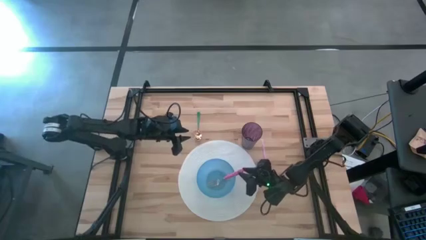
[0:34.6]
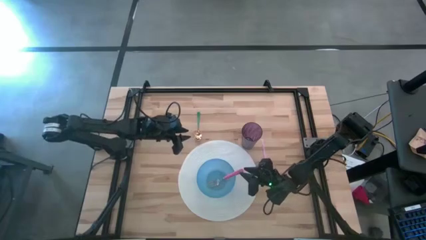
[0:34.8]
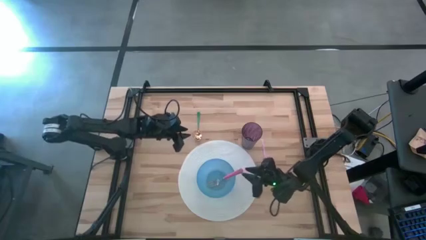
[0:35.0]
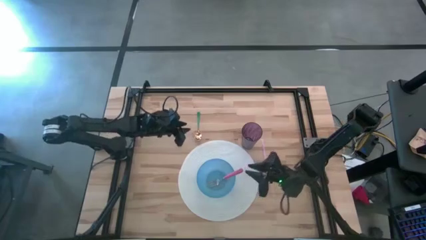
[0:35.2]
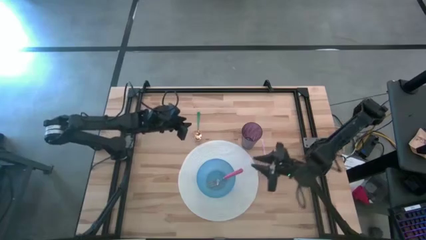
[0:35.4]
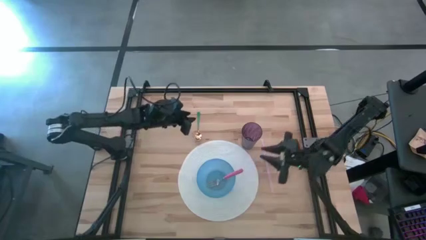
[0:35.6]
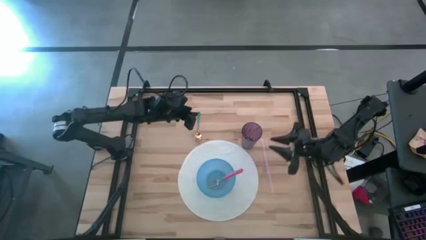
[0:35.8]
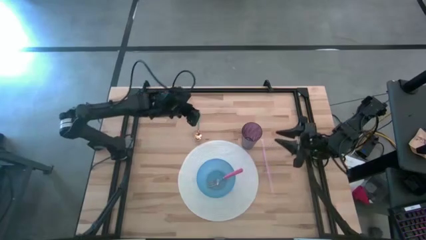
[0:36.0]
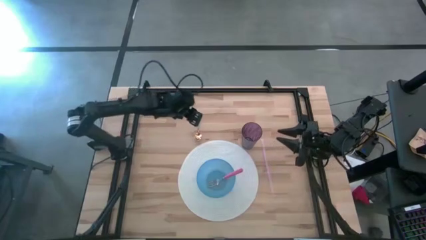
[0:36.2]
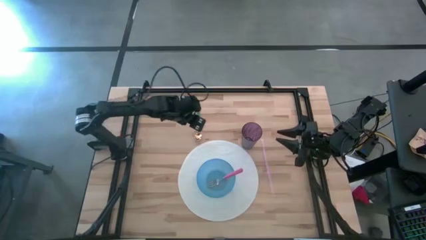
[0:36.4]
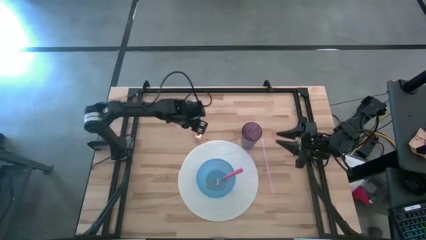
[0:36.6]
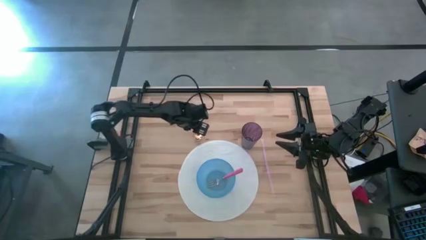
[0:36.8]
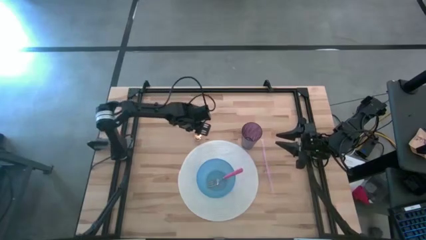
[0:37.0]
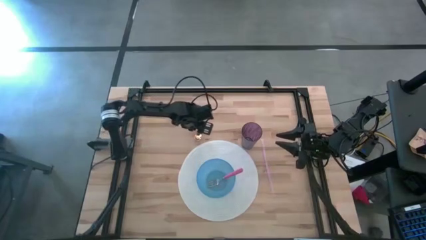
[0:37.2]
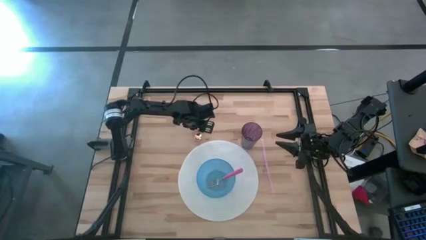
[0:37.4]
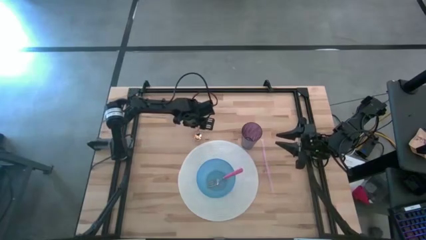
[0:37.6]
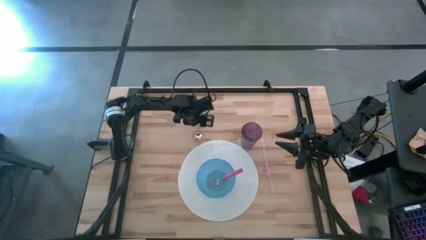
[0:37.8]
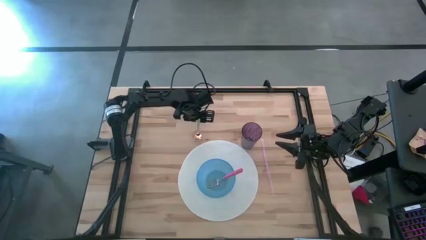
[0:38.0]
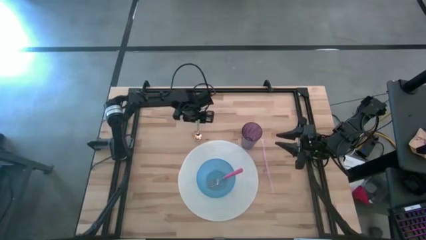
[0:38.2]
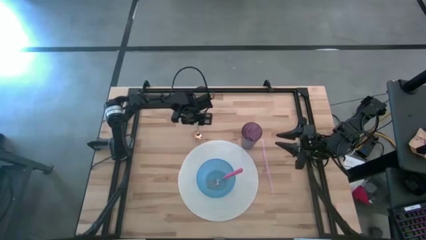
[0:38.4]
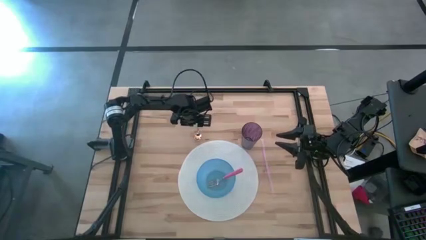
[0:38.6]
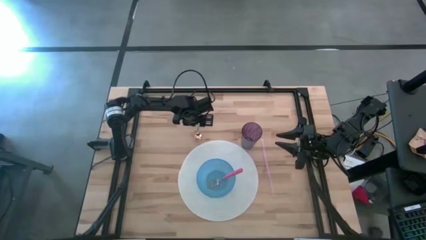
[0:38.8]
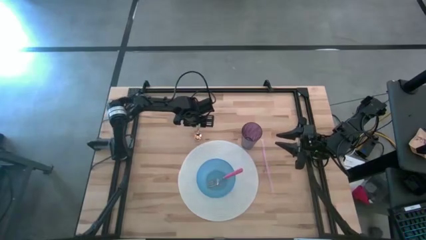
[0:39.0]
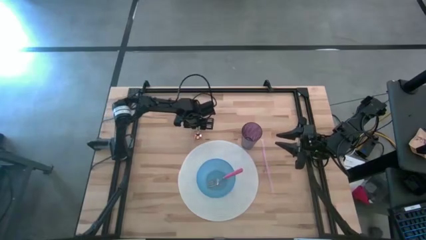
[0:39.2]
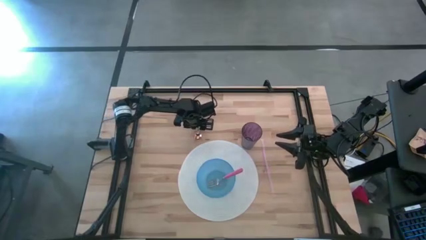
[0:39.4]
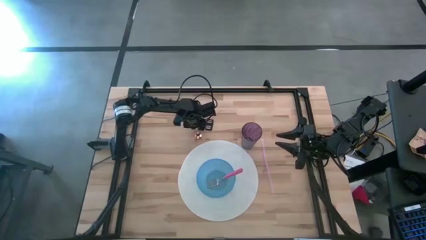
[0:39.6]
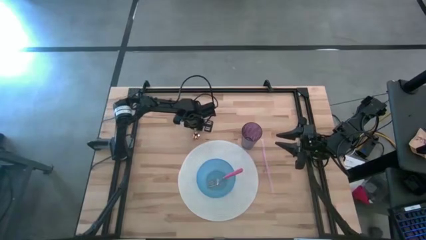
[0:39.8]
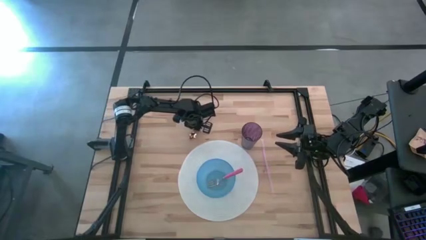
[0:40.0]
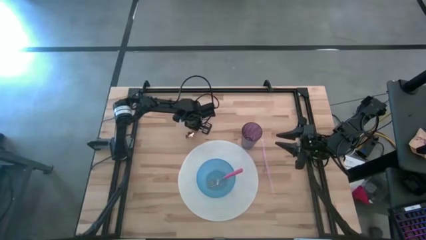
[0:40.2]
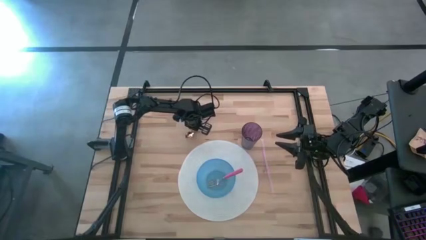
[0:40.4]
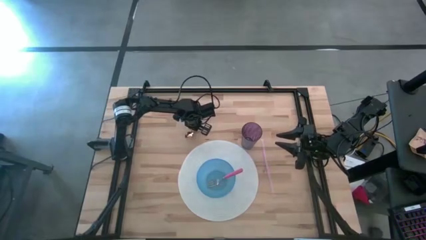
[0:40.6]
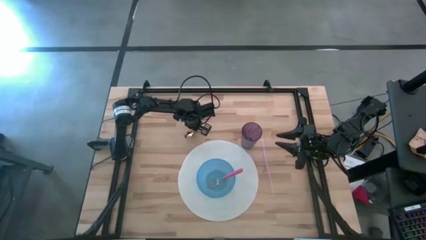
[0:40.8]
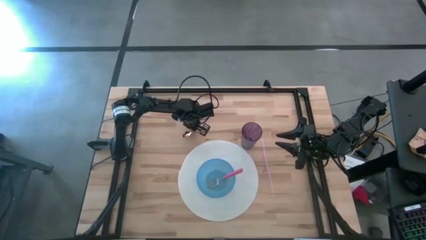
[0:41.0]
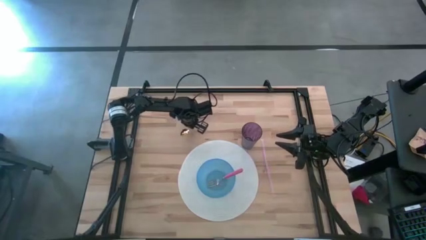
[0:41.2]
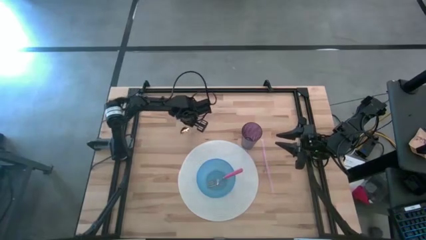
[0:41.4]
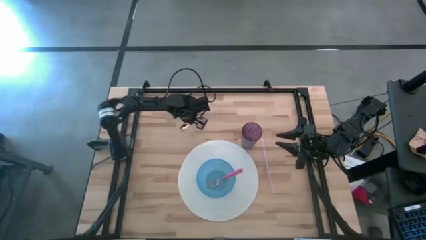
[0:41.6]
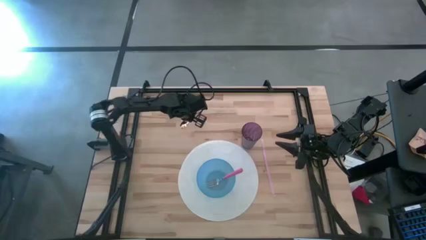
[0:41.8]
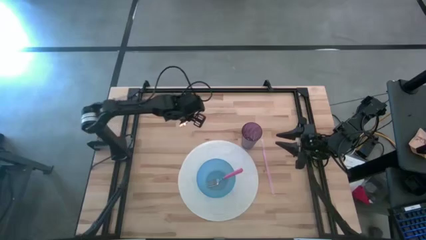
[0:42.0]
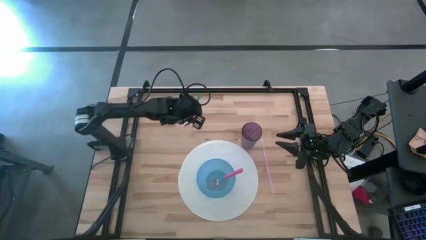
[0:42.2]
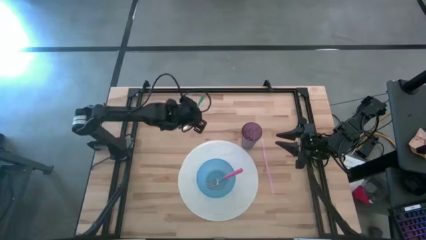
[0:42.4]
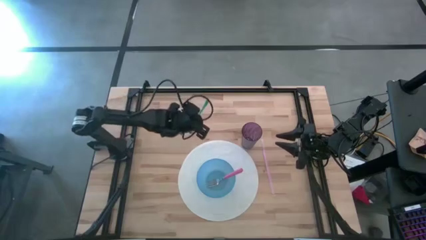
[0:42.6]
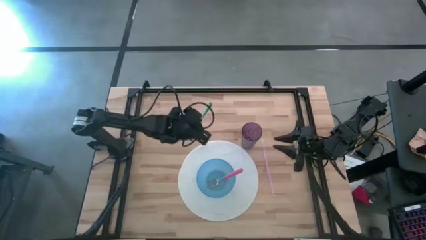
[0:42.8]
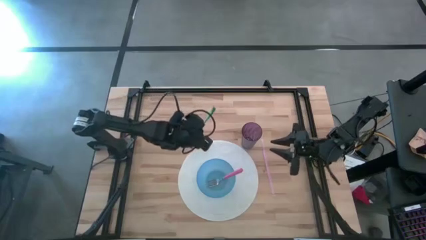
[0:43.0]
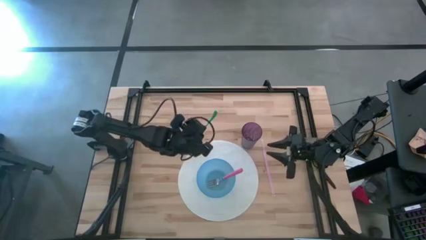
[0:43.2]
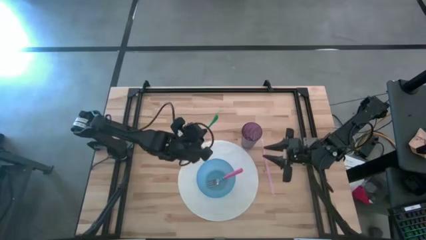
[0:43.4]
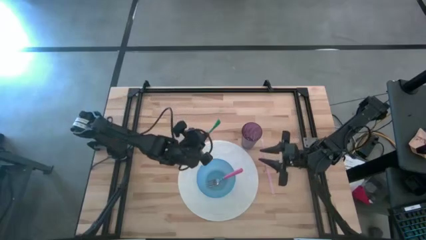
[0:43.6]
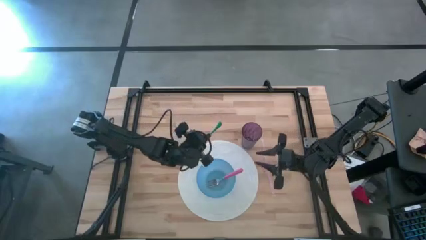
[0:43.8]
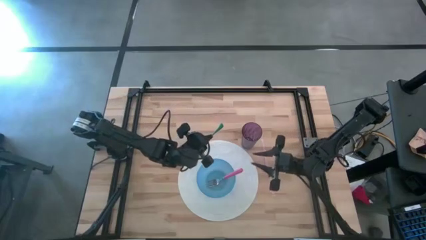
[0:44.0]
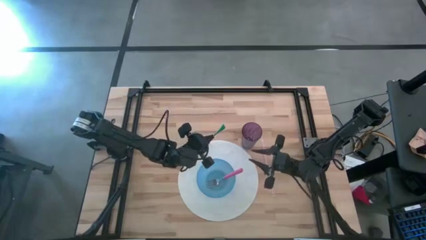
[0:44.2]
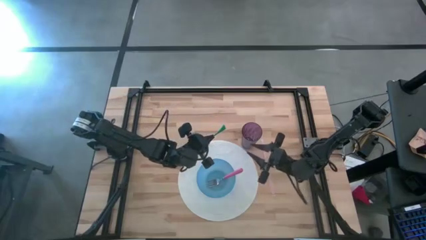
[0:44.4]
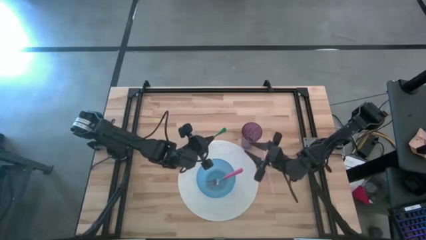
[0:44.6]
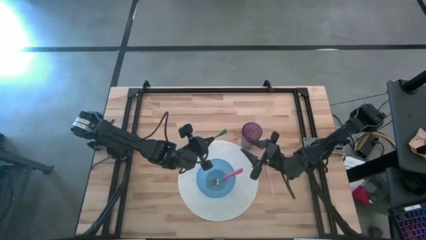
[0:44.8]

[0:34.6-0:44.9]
Task: Pick & Place Utensil
Put the green spoon into the blue bowl

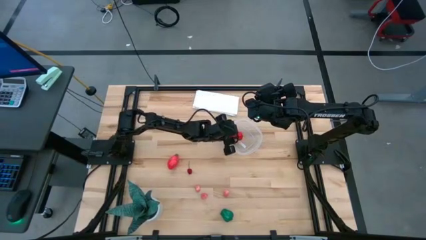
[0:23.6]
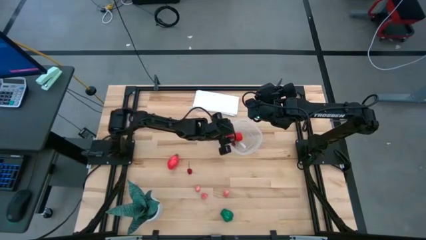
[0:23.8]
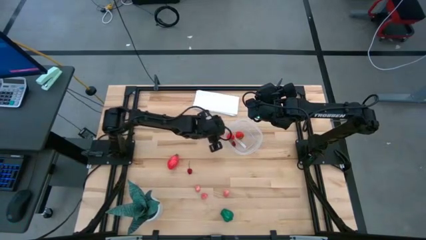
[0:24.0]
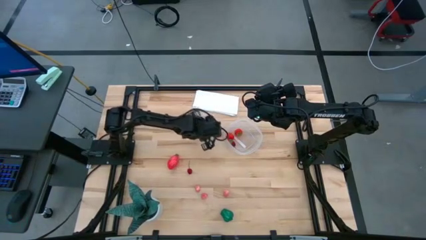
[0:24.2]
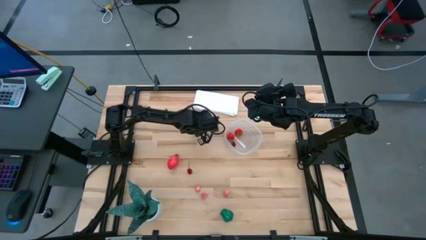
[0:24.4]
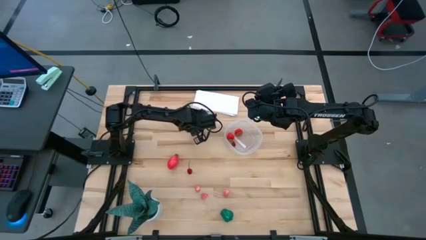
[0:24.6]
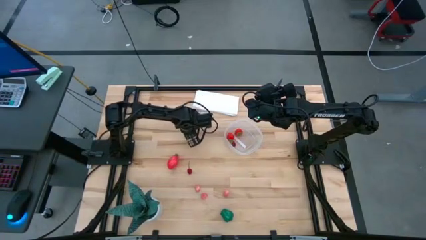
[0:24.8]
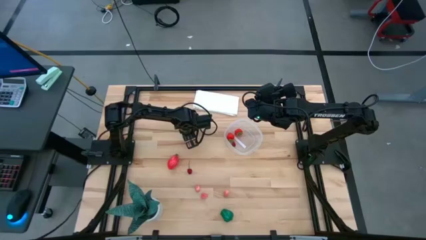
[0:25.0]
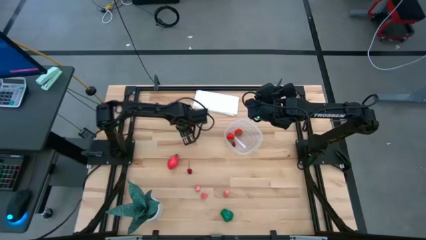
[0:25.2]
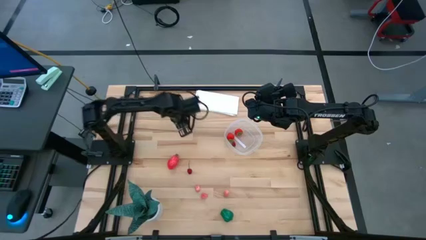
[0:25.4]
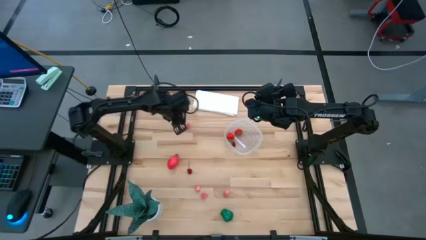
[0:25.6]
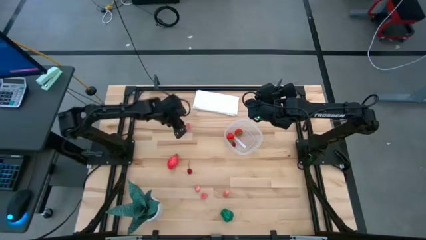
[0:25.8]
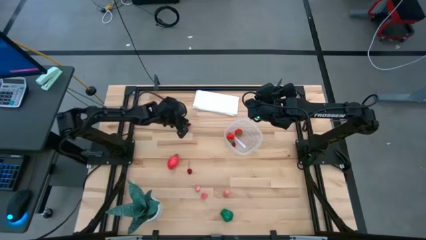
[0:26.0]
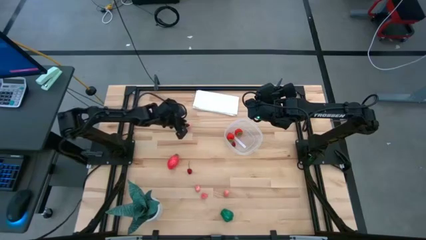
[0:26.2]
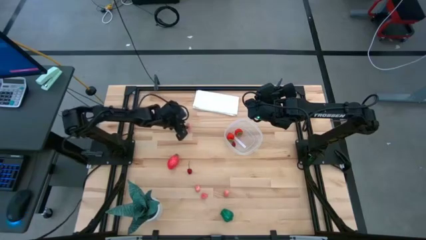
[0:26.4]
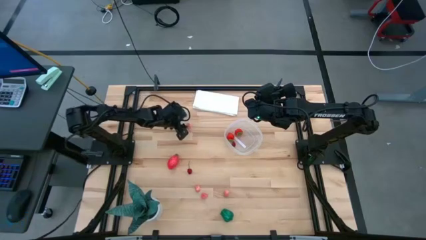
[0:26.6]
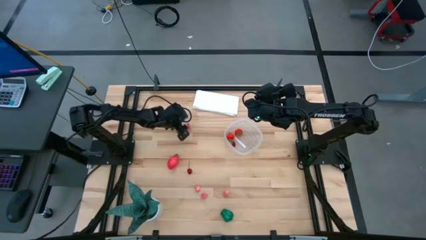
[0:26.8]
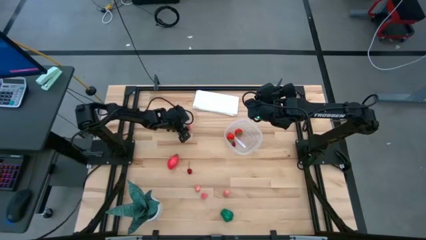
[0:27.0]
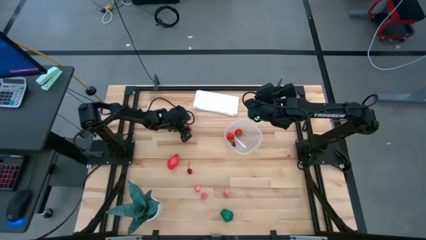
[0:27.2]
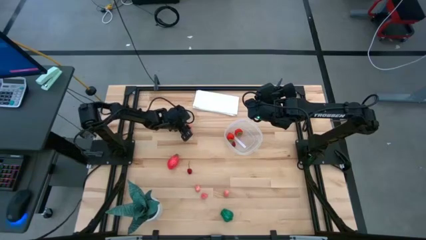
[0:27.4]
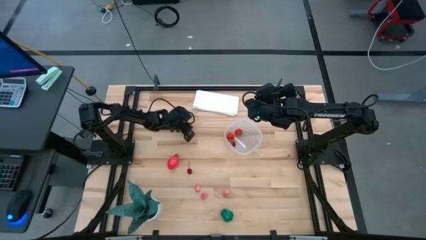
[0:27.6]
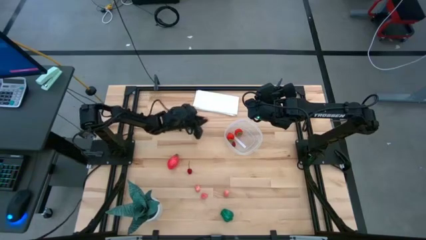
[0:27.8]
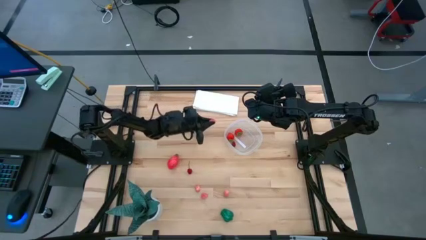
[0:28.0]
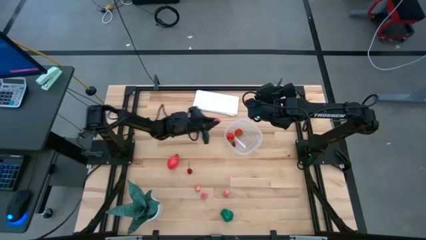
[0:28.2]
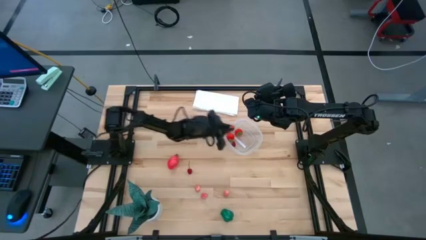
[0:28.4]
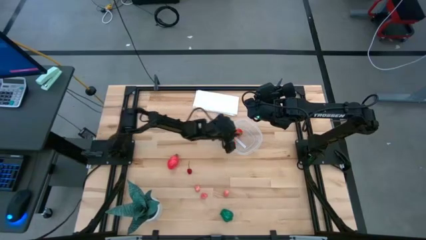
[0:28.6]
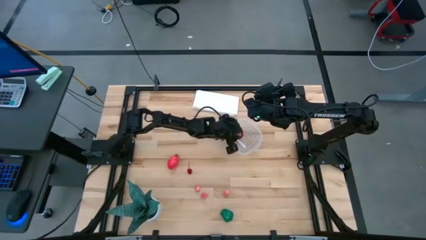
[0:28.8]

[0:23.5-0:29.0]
Task: Pick and placing Produce into tupperware
Put the top left pink peach into the transparent bin
